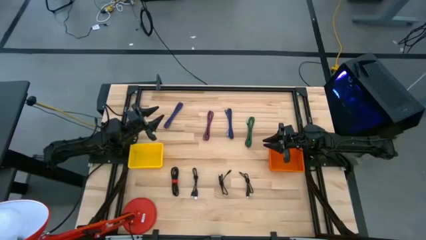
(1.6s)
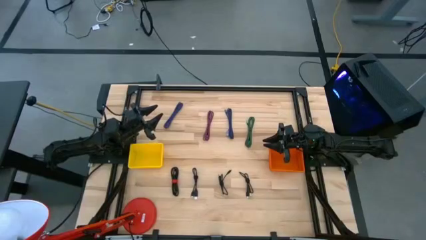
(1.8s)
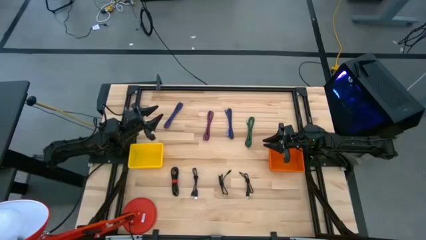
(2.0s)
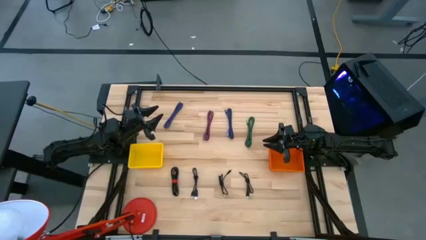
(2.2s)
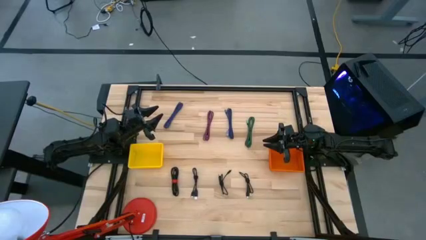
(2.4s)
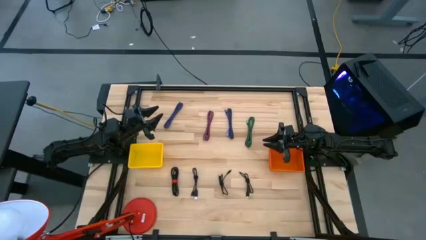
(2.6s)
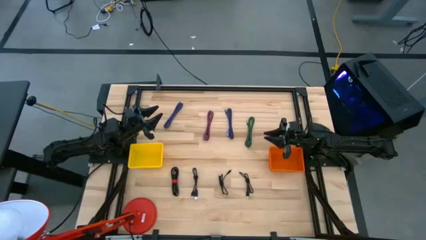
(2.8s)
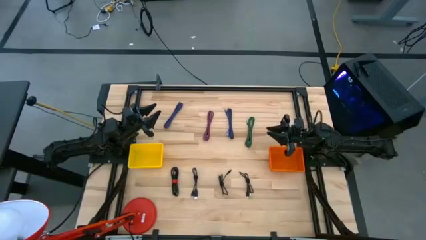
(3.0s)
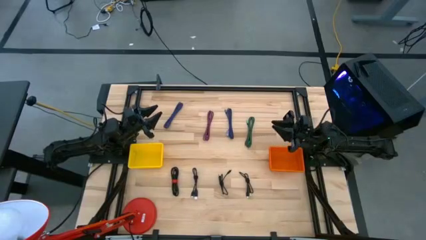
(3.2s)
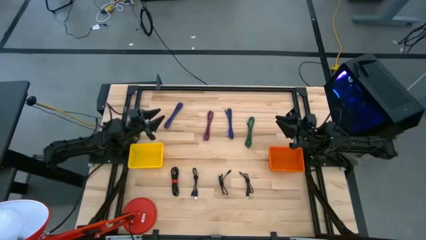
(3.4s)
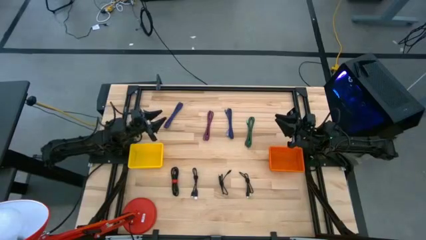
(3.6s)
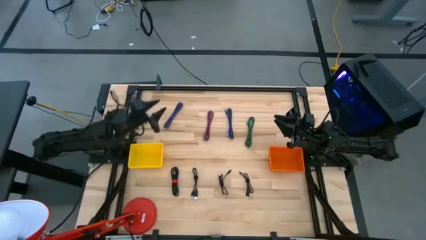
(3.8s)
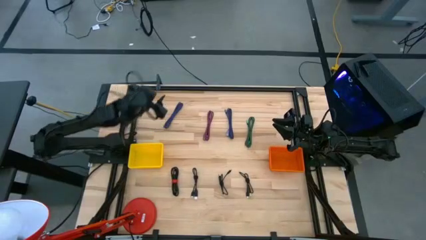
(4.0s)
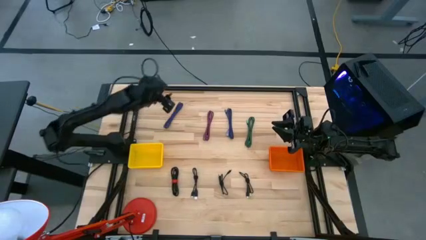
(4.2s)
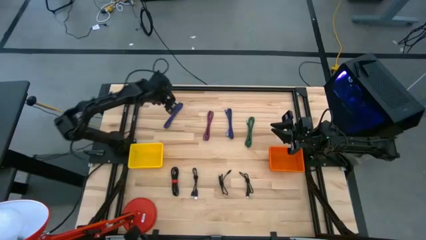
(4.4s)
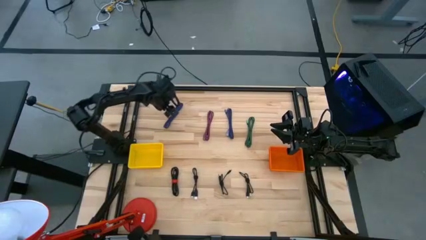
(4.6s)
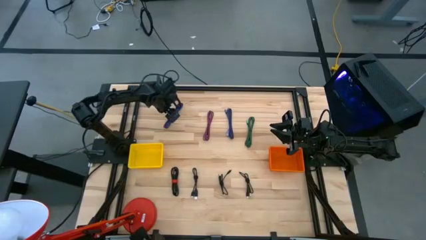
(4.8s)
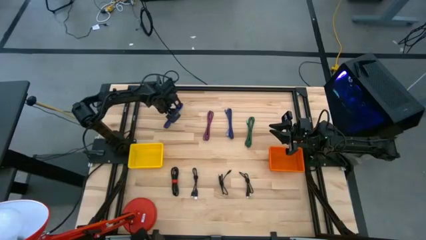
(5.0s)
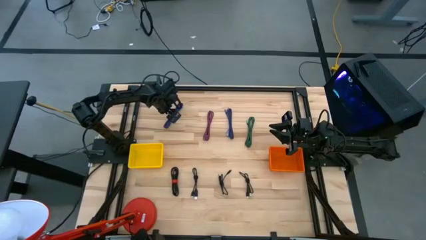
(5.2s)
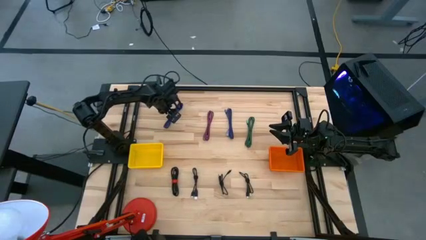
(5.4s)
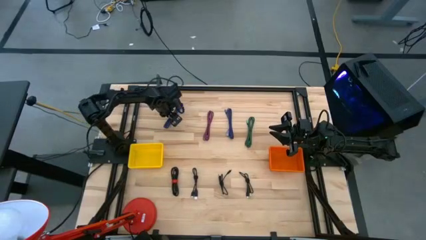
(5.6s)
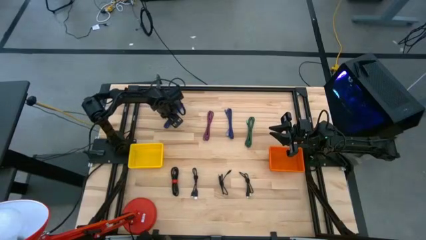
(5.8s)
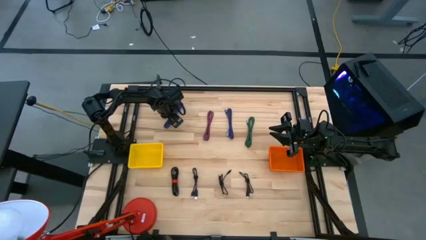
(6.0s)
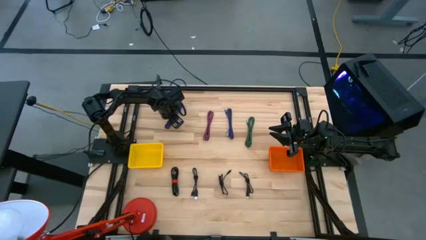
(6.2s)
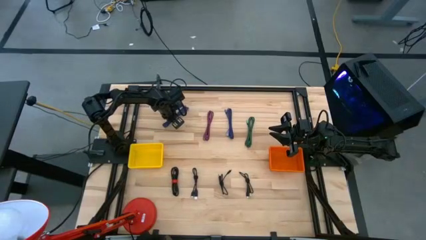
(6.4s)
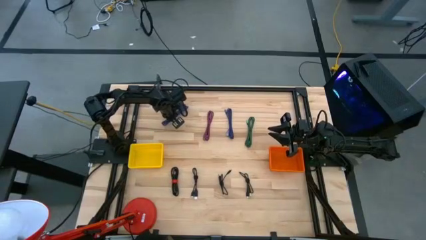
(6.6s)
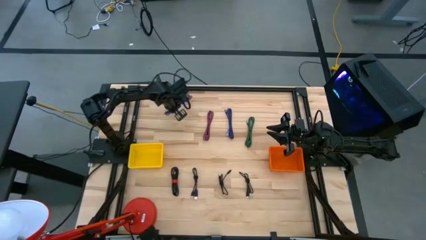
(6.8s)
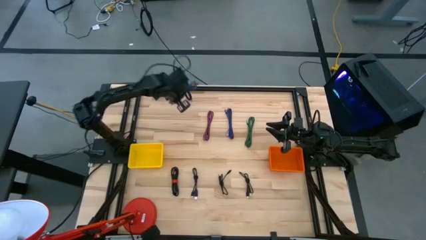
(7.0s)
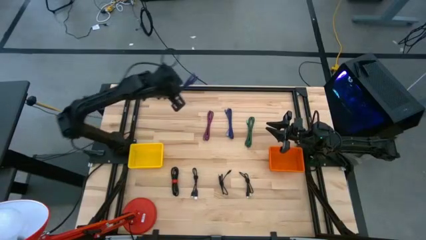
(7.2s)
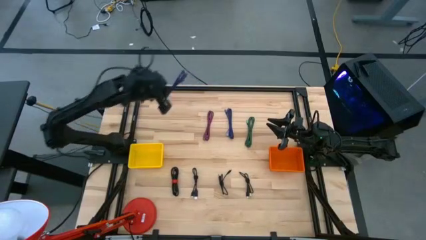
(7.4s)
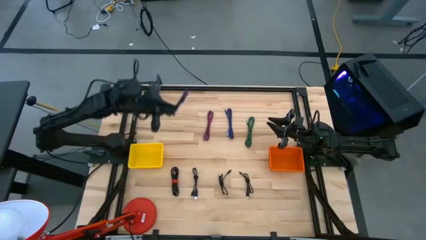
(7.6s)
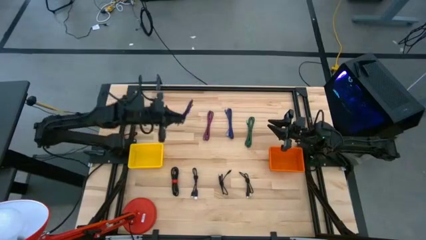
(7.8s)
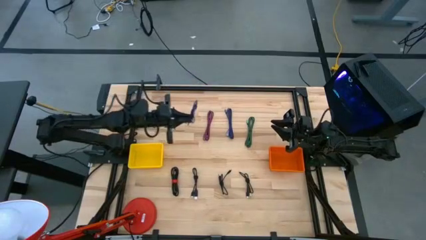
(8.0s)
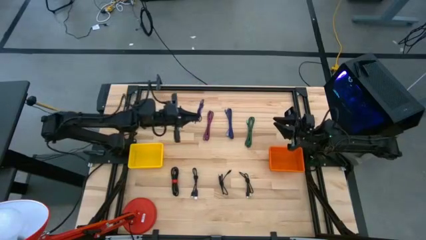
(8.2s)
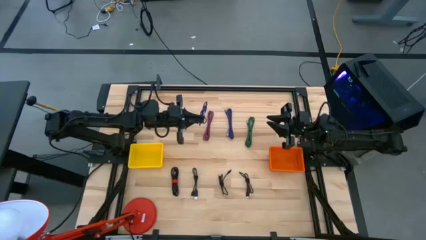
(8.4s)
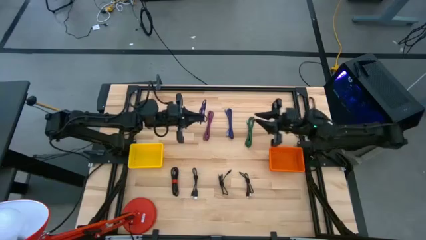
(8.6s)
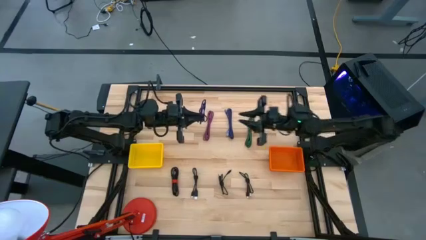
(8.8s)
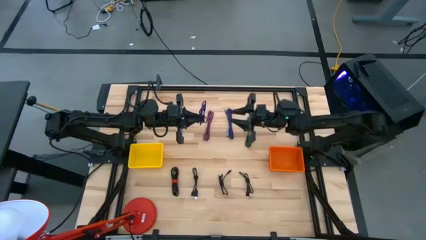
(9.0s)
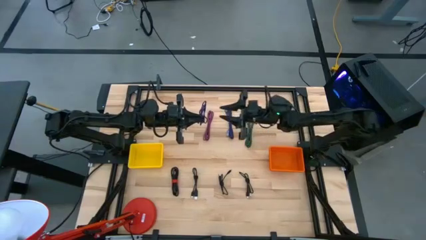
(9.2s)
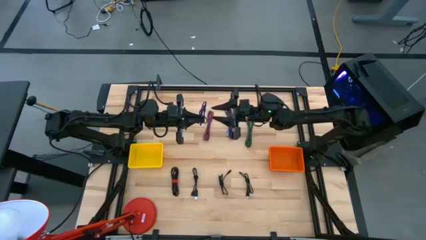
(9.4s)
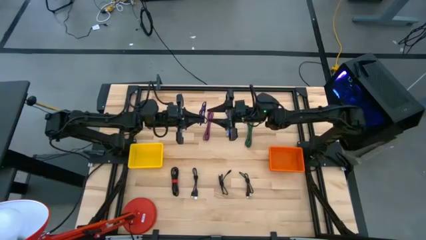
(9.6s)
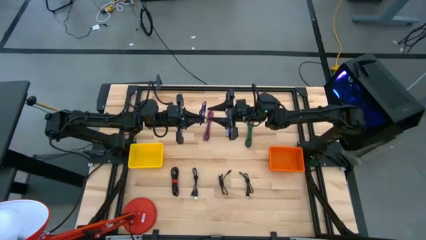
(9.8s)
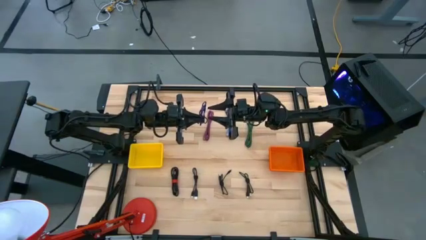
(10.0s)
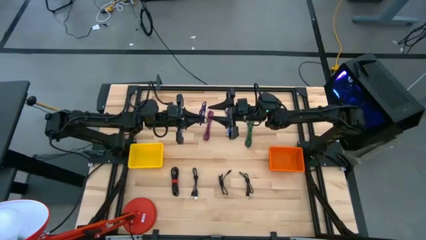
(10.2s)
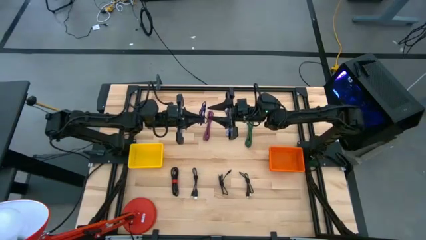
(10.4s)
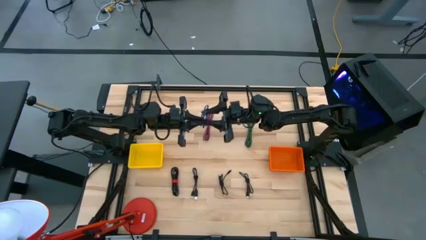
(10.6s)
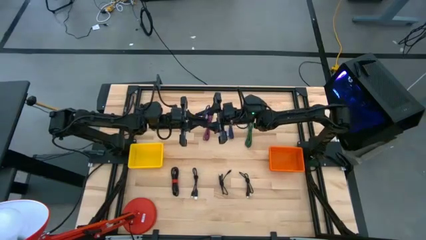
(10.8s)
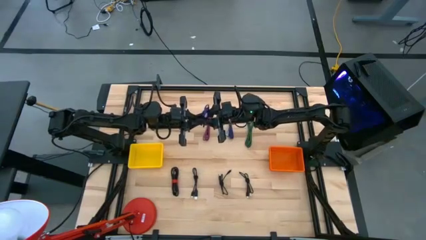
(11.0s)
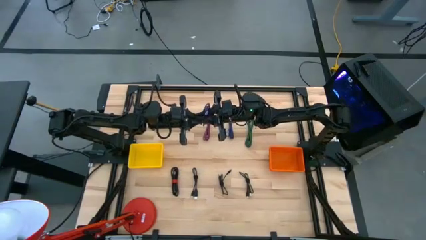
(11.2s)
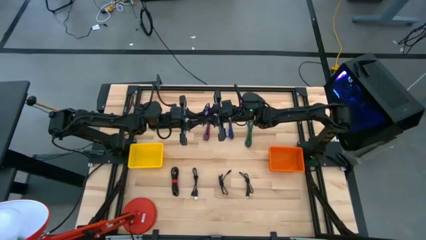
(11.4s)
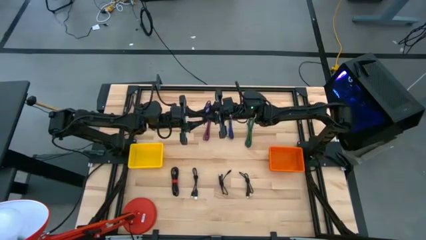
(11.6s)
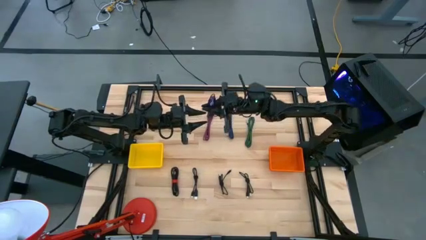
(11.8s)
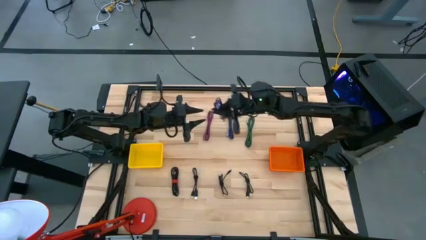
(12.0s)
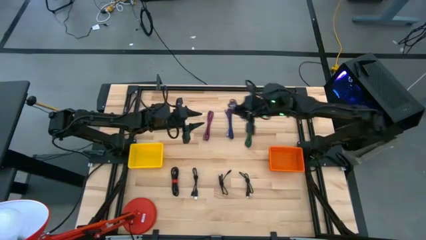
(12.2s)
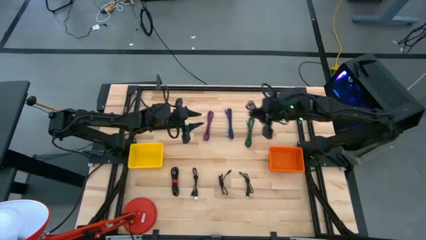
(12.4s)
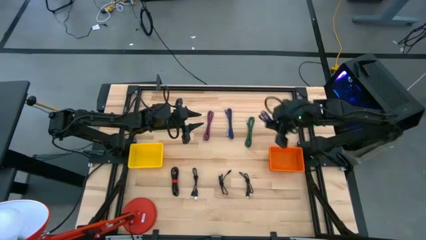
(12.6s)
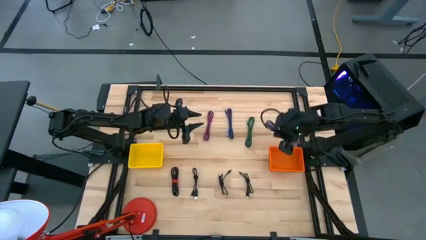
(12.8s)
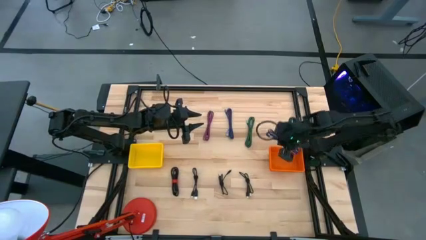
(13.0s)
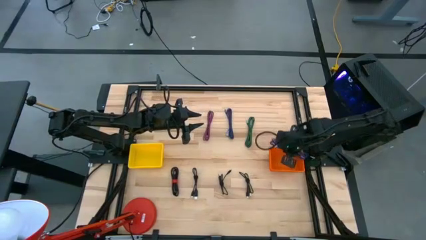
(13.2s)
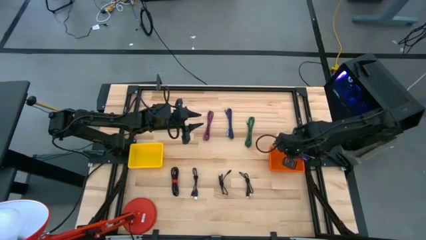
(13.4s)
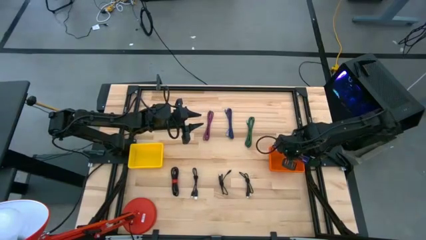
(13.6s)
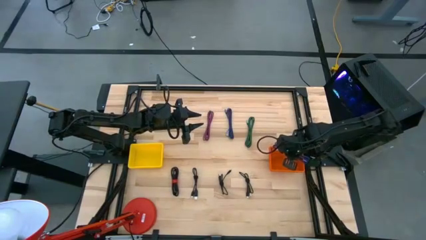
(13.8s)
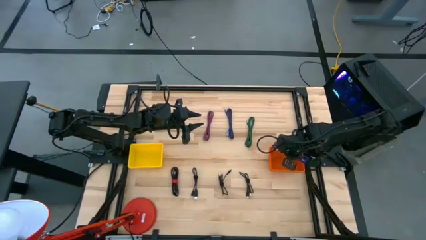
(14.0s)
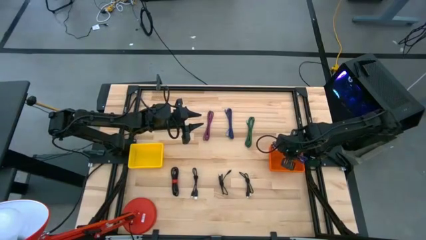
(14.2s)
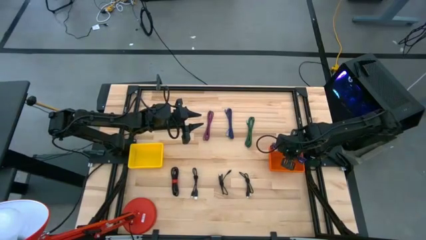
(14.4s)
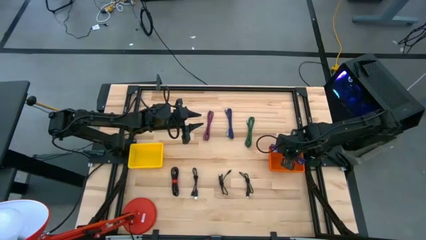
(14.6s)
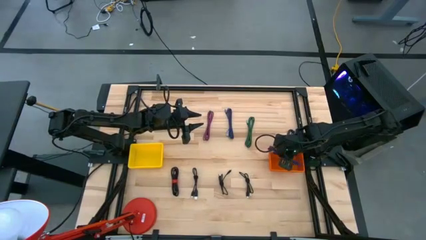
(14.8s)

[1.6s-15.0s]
Task: Pick & Place USB Port
Put the blue USB cable into the orange bin
